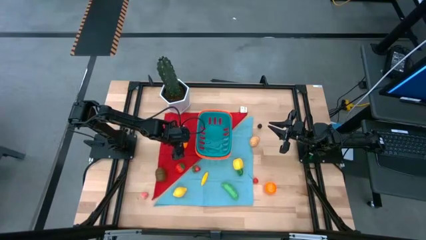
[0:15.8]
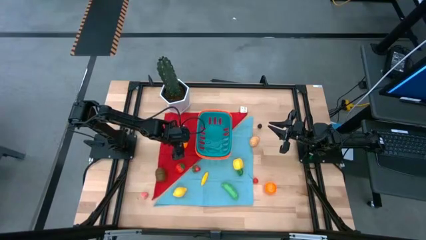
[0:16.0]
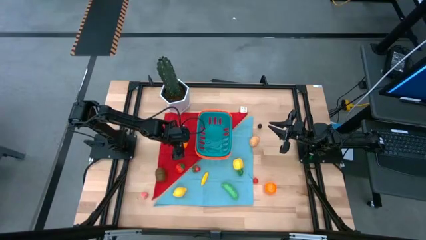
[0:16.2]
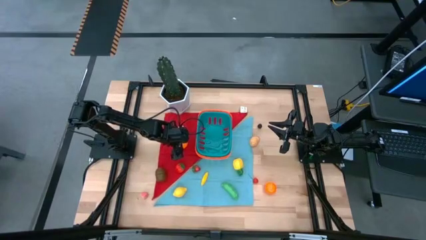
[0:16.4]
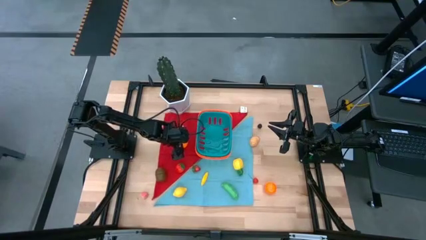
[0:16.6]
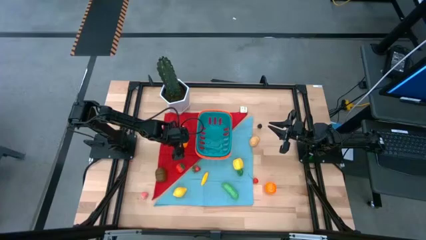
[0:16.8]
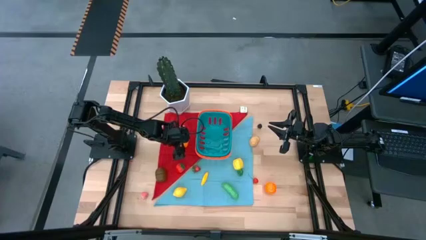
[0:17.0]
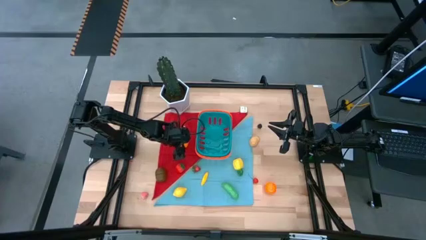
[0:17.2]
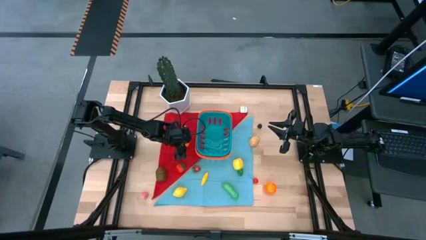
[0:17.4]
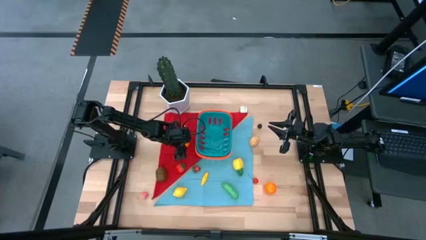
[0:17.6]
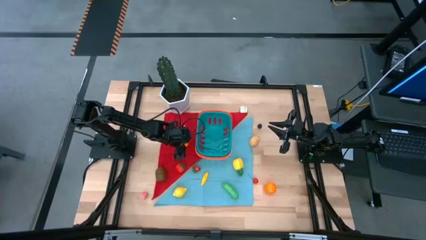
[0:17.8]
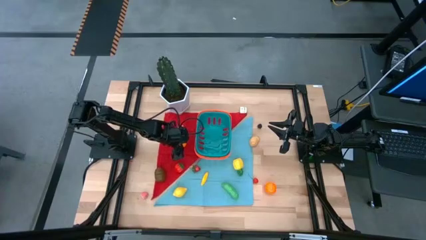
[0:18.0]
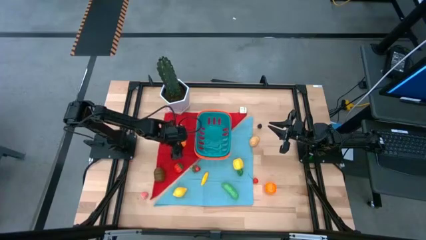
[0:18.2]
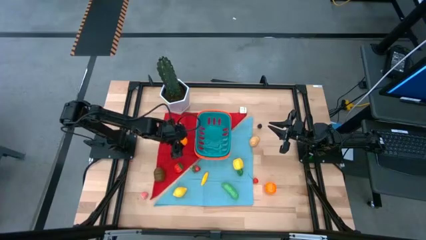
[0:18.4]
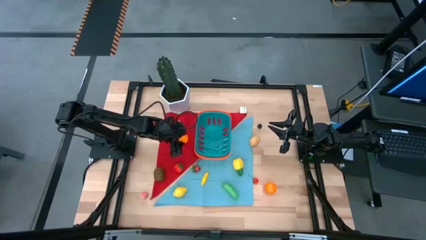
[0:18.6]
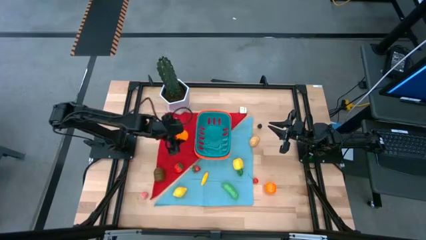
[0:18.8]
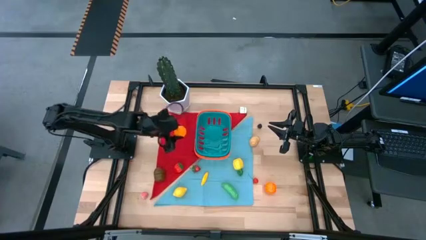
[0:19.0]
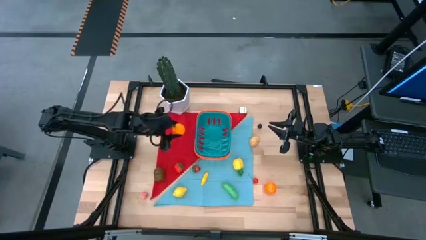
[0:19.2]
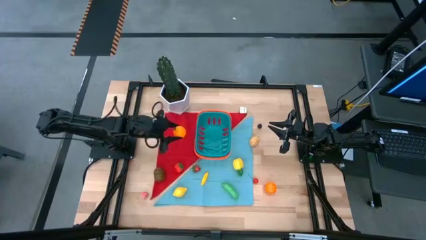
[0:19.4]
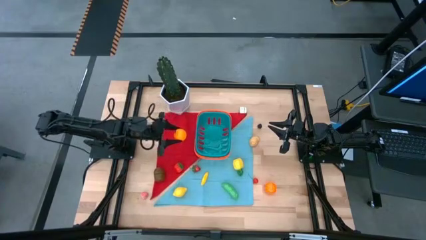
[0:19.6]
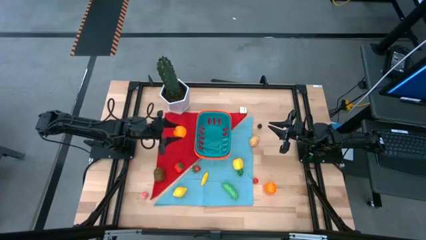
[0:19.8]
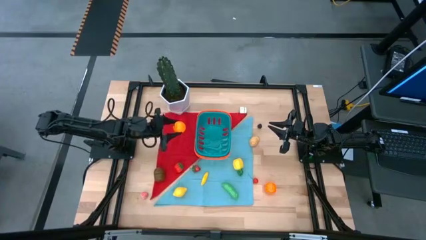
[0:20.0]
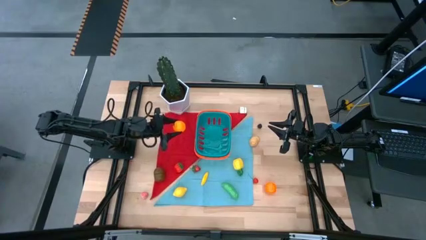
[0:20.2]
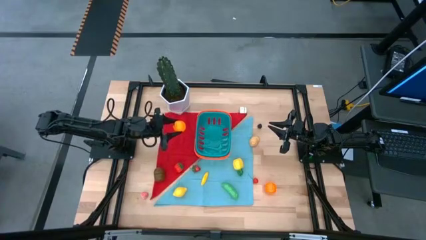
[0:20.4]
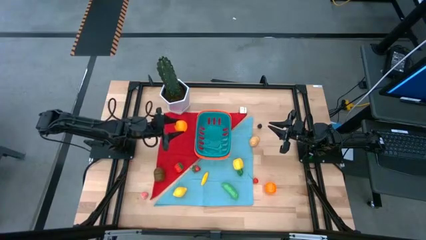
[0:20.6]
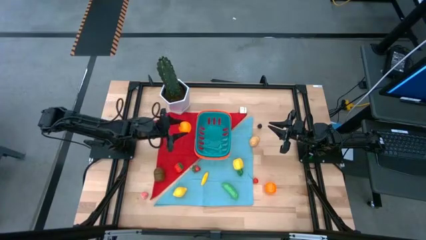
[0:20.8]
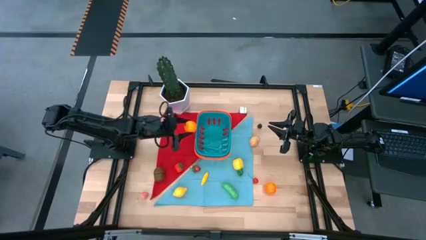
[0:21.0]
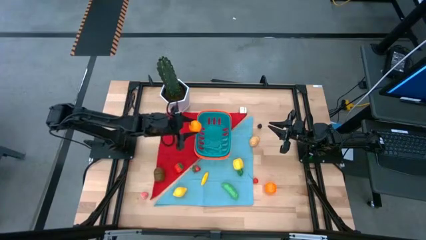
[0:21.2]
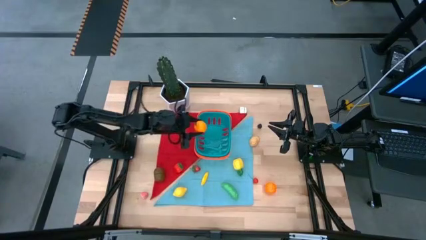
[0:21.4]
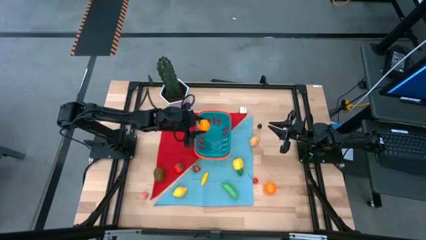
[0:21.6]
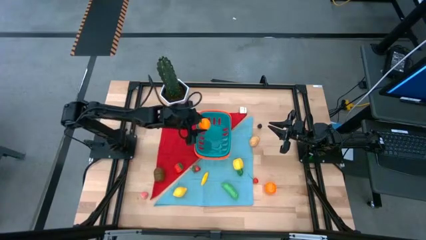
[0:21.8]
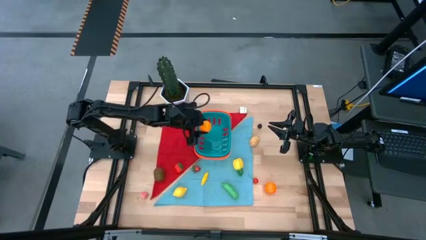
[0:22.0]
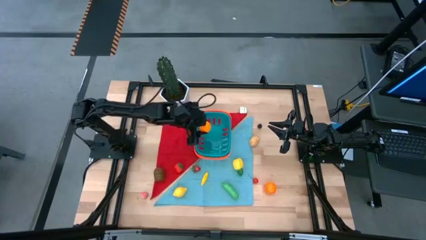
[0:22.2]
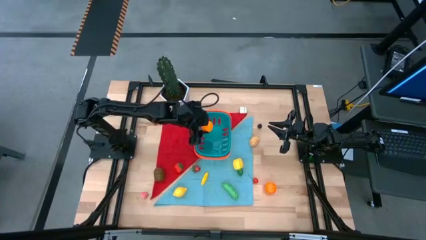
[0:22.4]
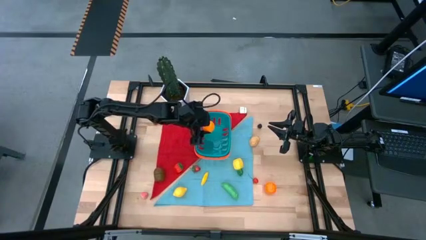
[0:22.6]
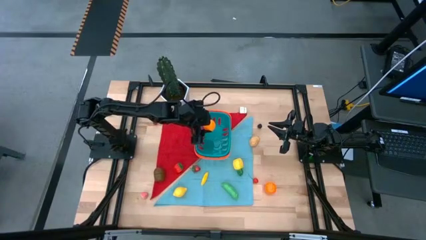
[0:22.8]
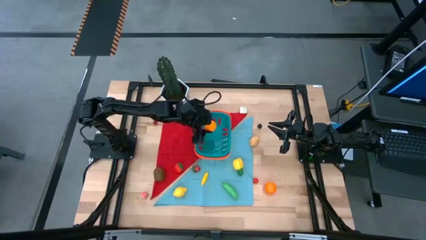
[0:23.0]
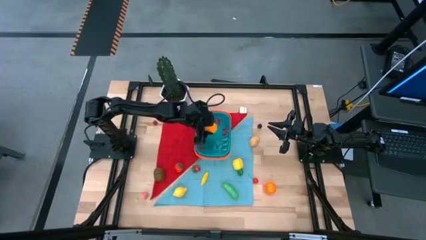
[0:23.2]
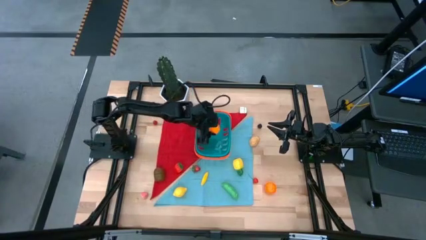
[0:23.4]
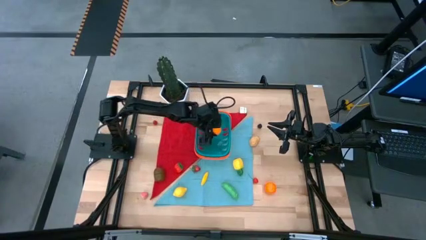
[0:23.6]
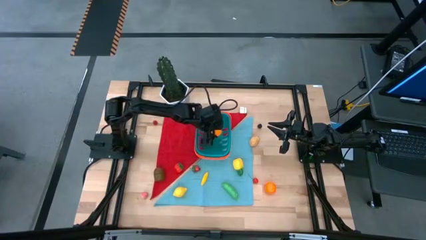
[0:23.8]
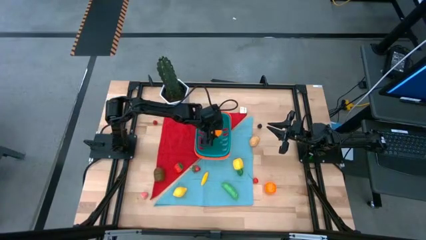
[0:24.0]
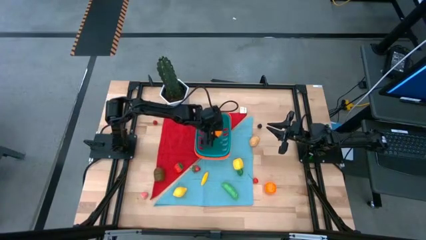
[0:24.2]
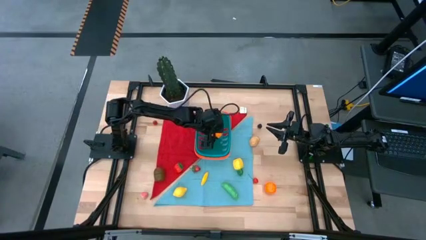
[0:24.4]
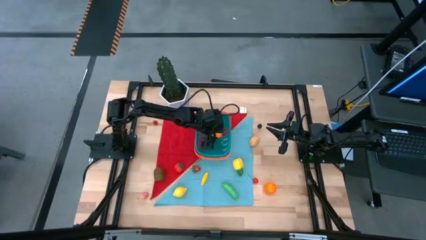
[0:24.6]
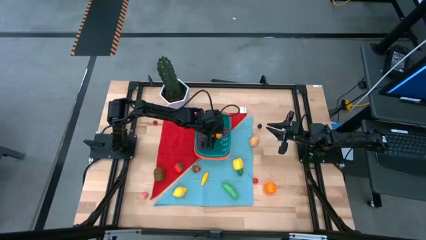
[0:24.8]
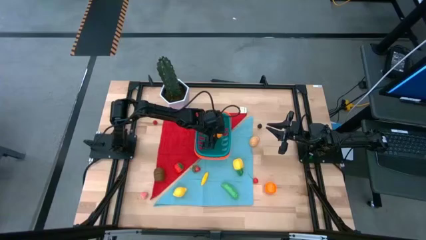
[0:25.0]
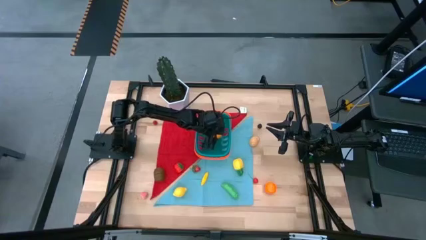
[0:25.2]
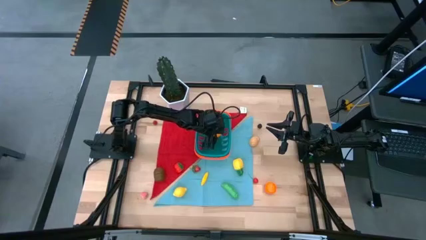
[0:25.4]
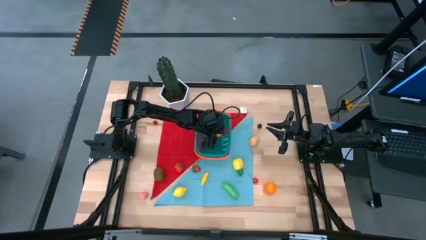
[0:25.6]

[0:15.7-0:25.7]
Task: Pick and placing Produce into tupperware
Put the orange into the basket
